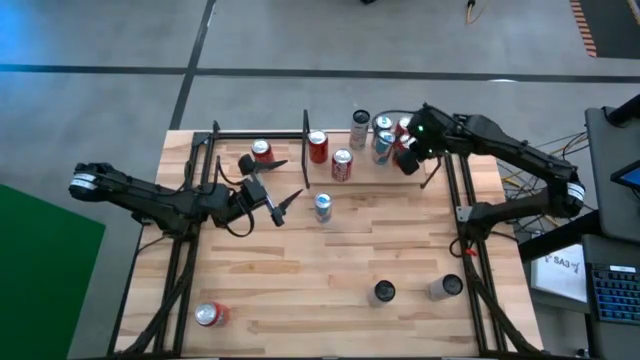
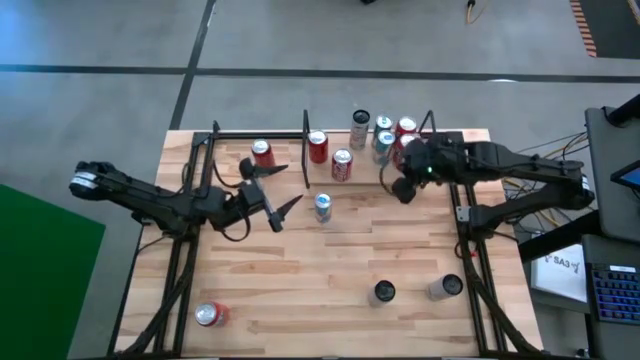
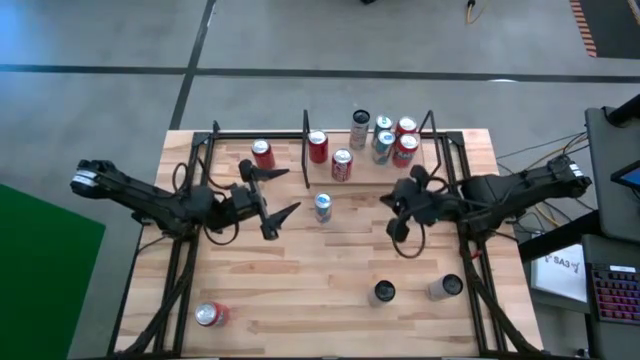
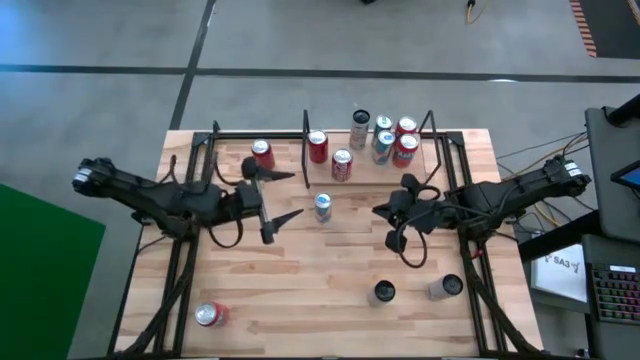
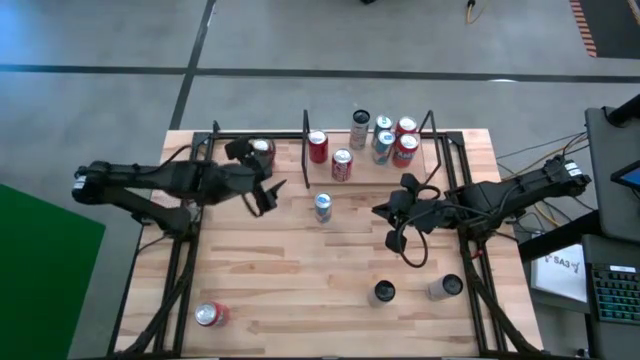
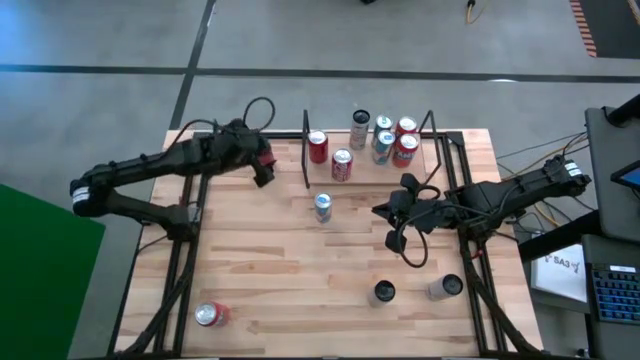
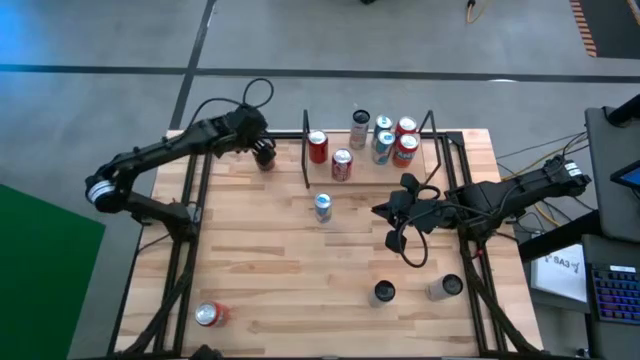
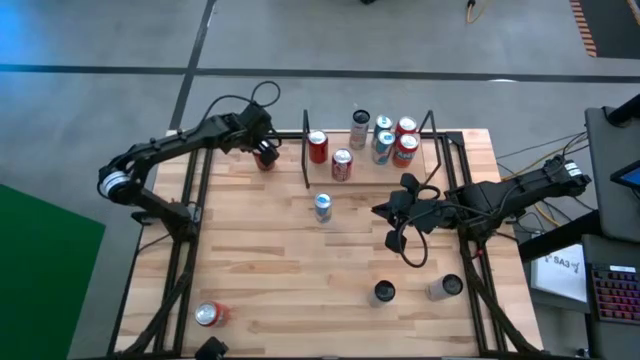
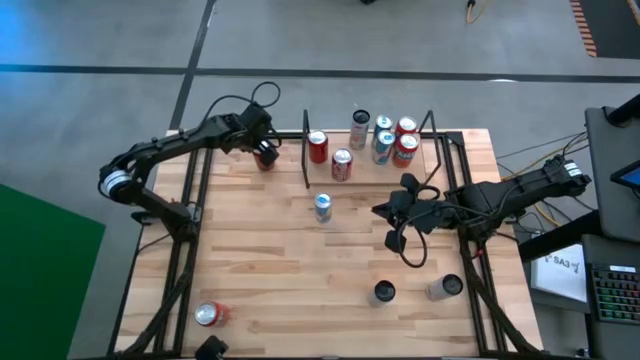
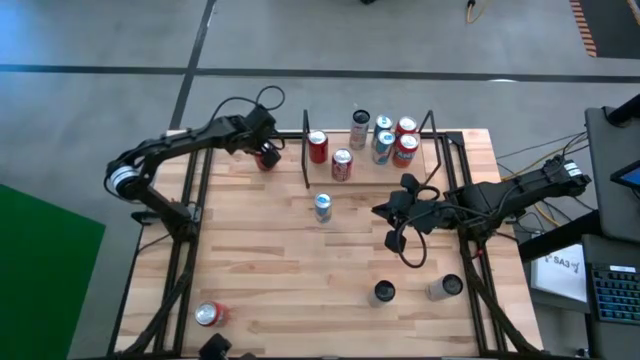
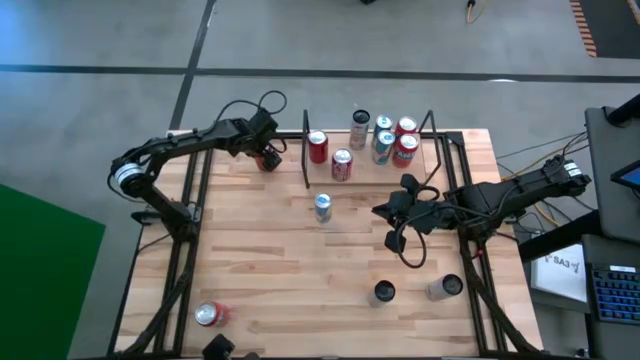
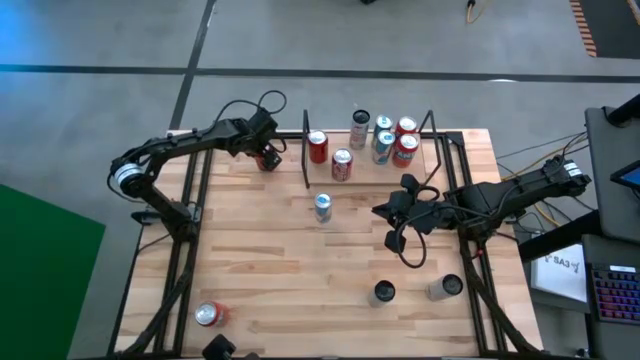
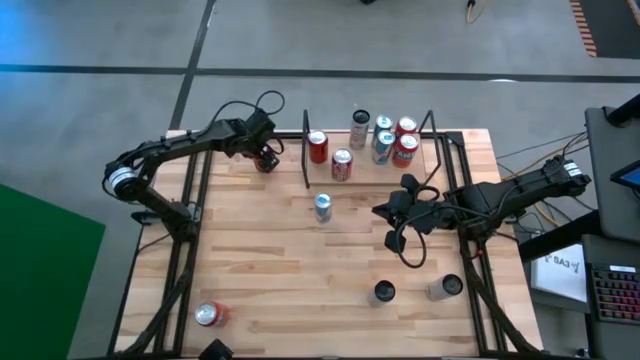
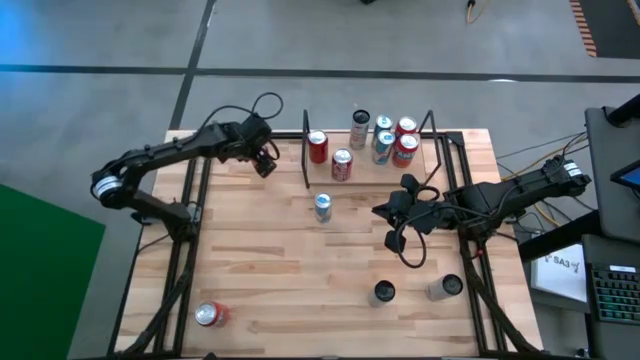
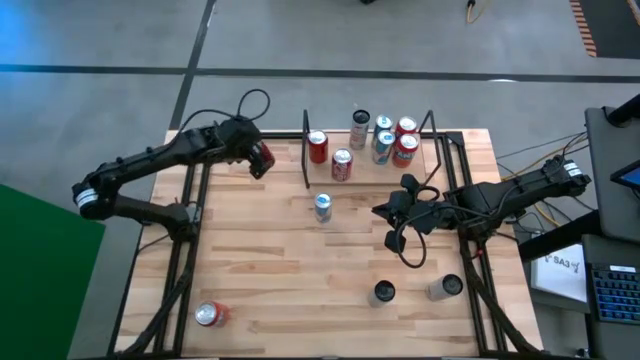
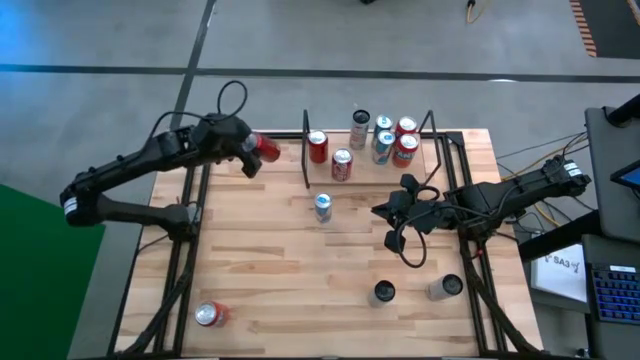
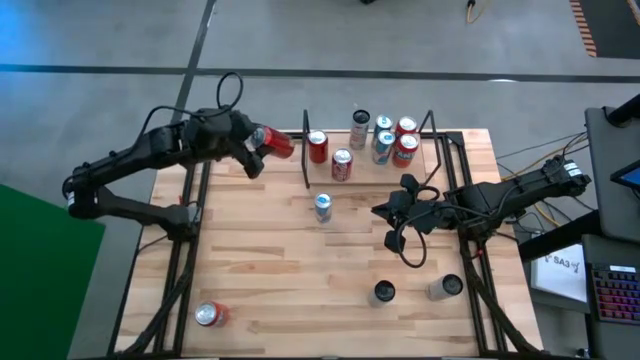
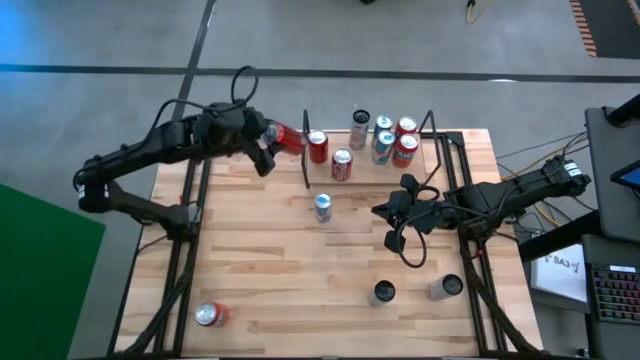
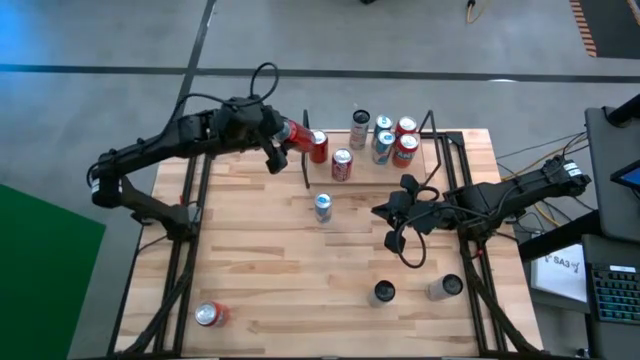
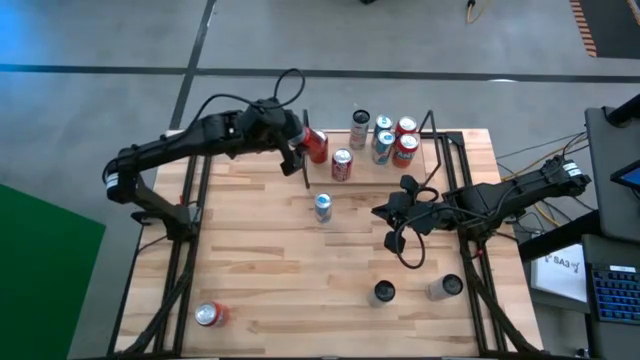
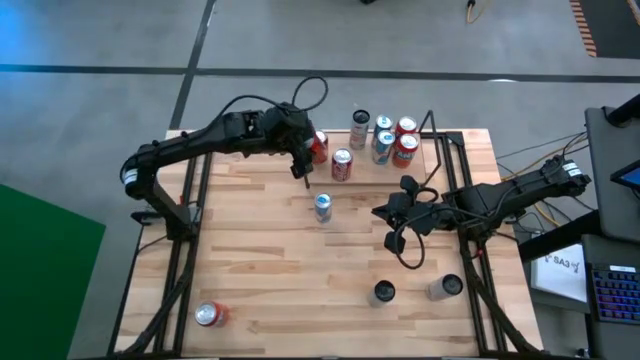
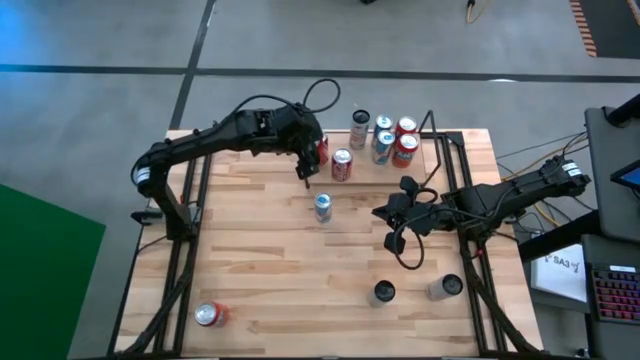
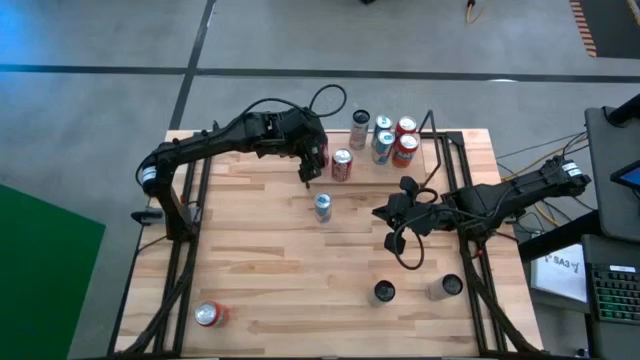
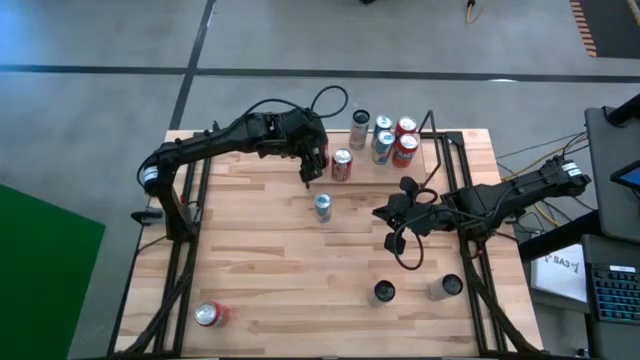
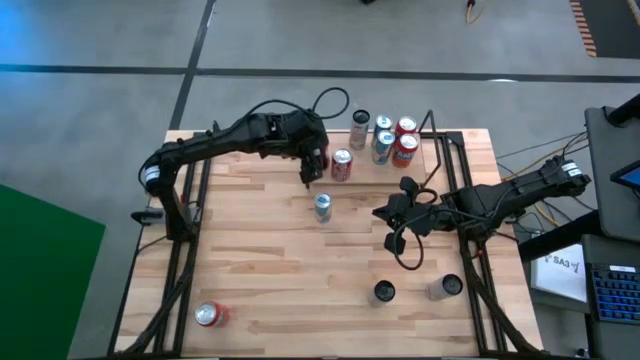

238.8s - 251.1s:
Task: Place canned beverage on shelf
Put the red and black soda can on the shelf

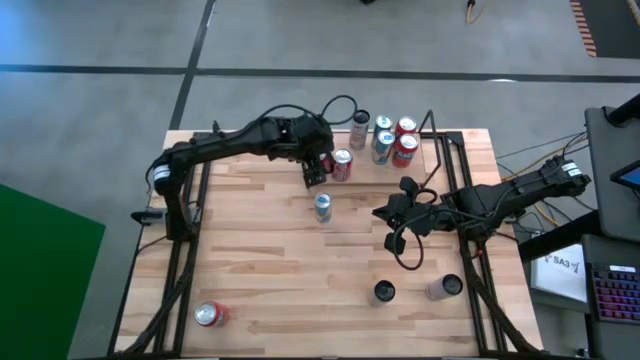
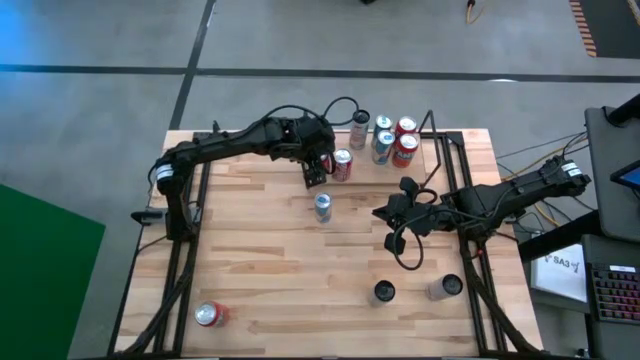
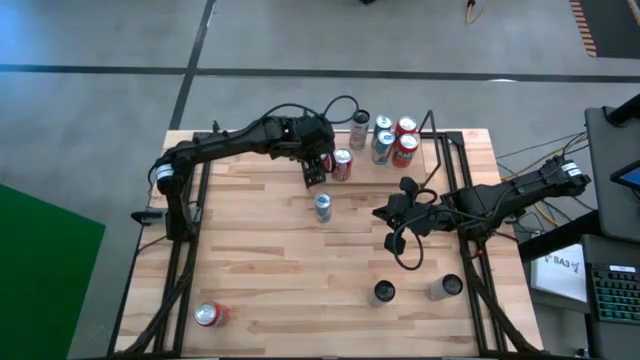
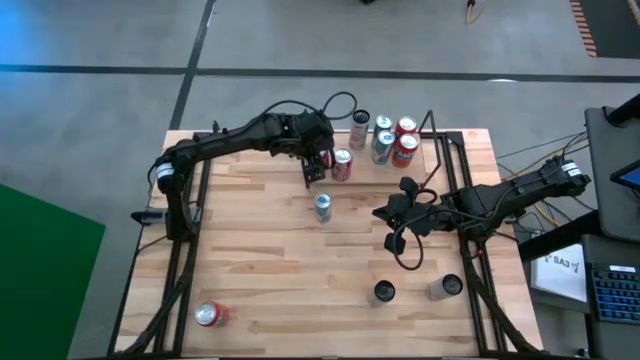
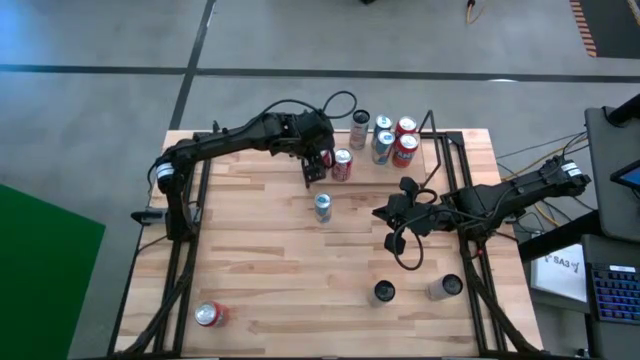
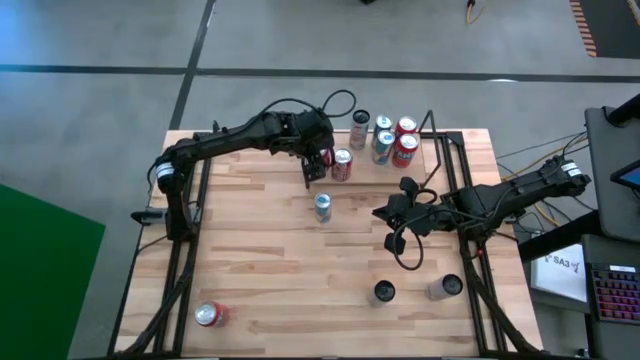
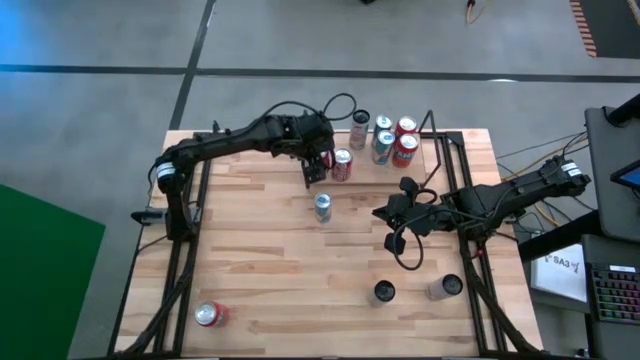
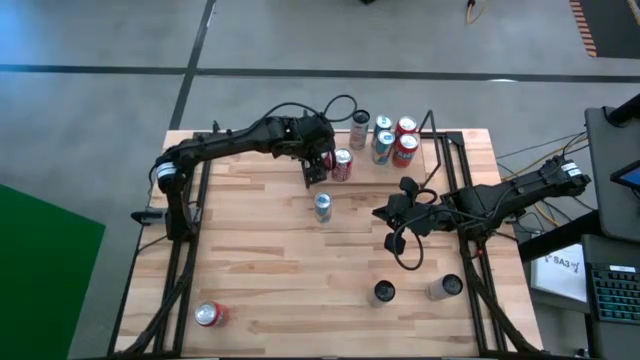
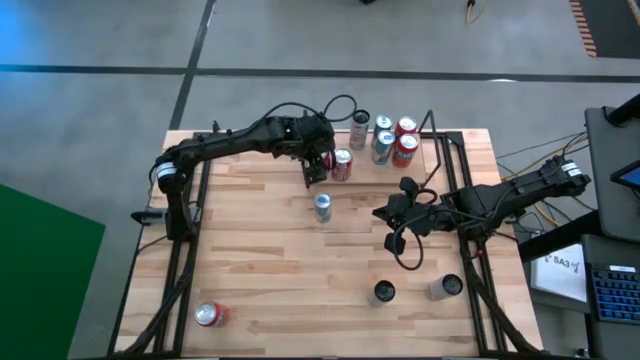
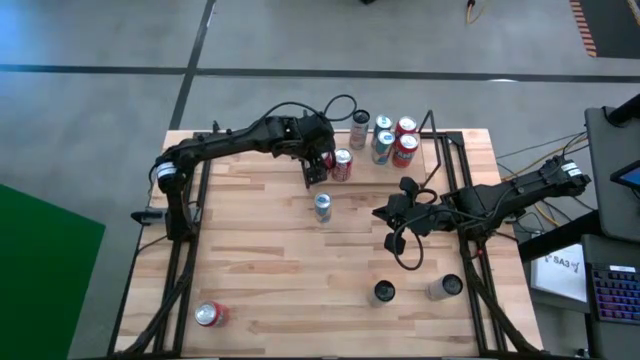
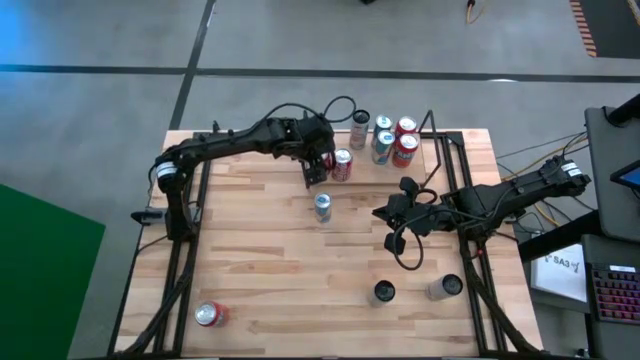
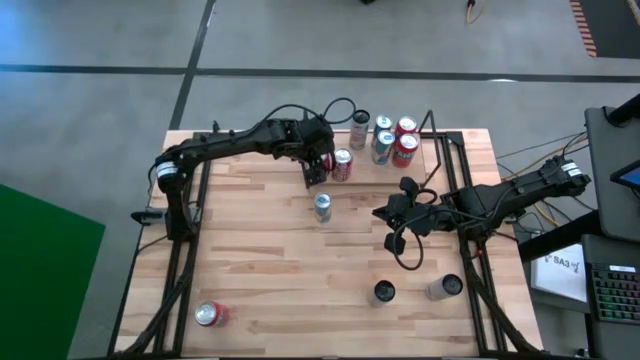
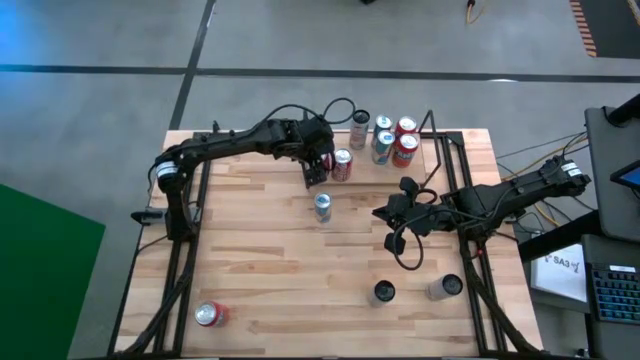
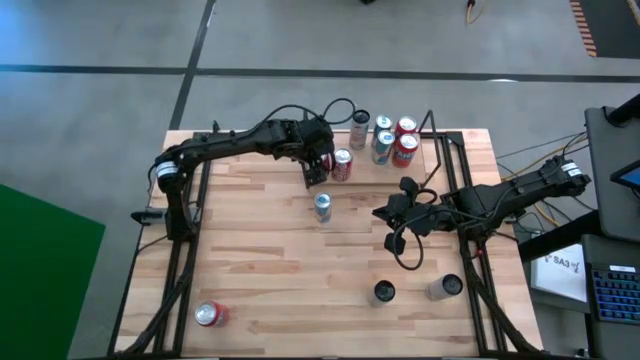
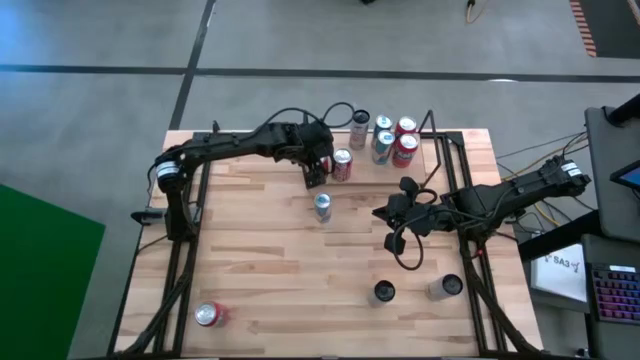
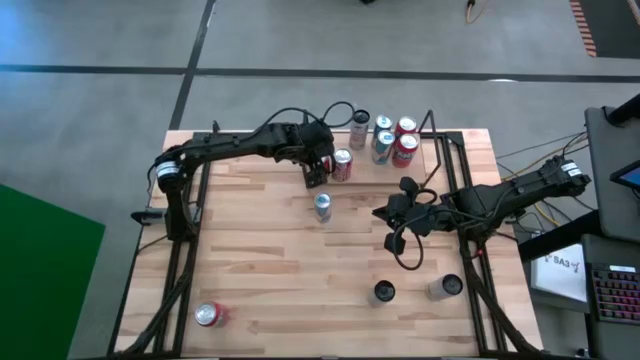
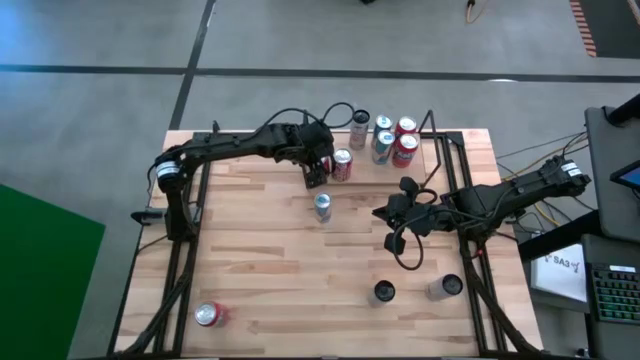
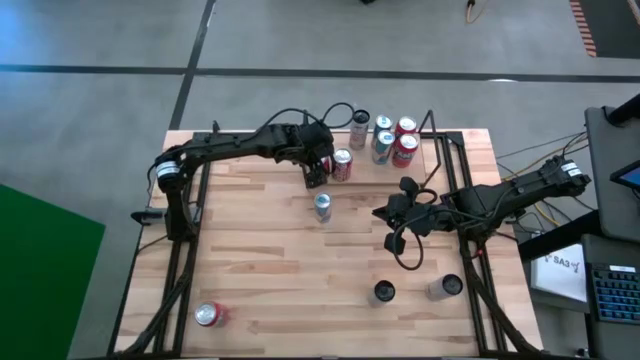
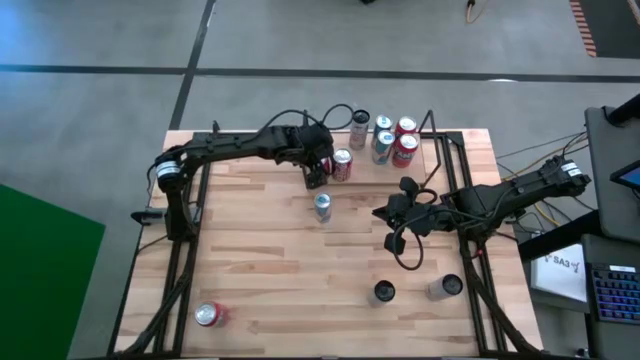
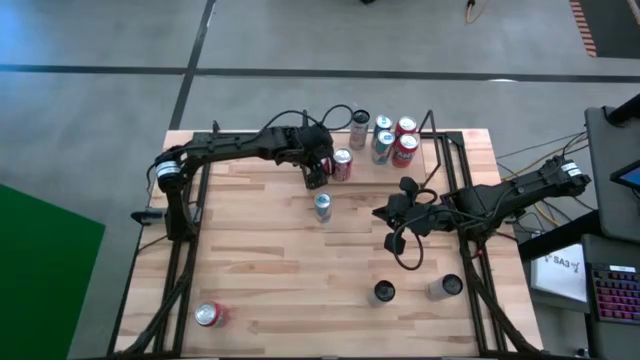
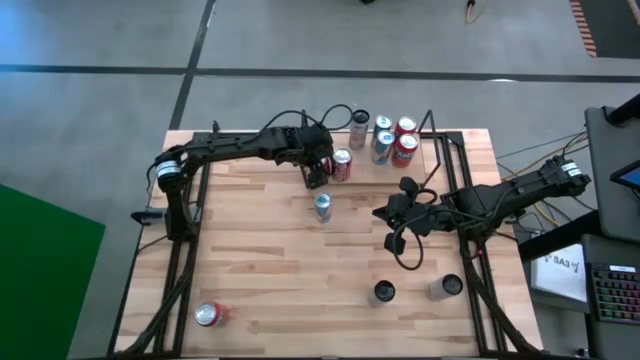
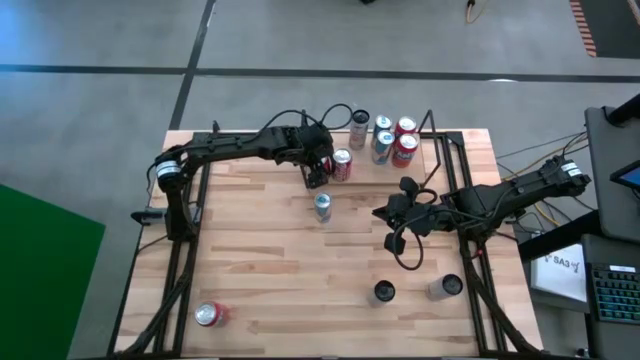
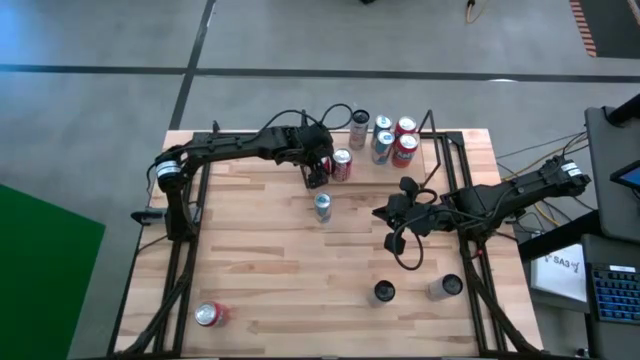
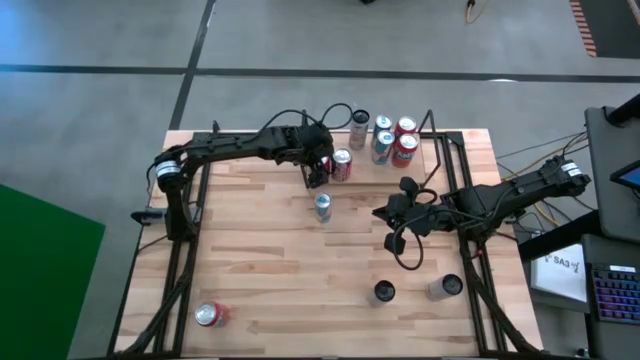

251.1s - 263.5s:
Put the red and black soda can on the shelf
